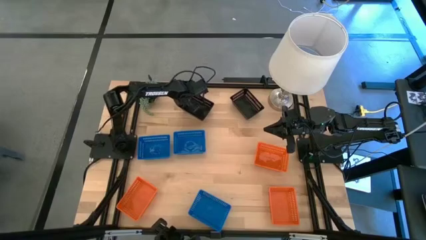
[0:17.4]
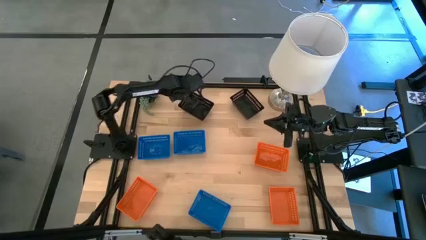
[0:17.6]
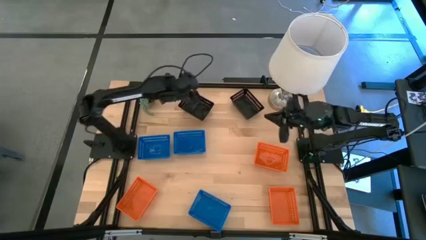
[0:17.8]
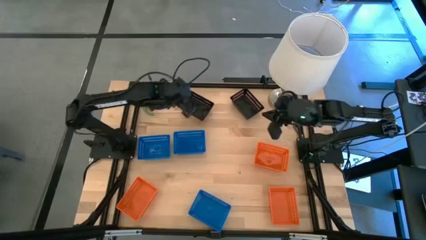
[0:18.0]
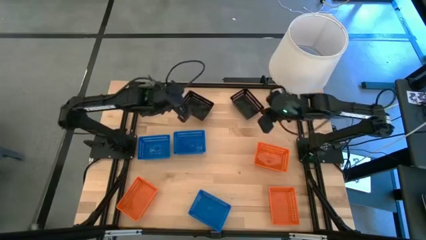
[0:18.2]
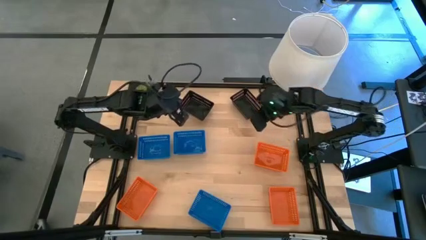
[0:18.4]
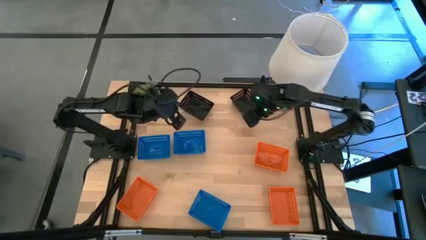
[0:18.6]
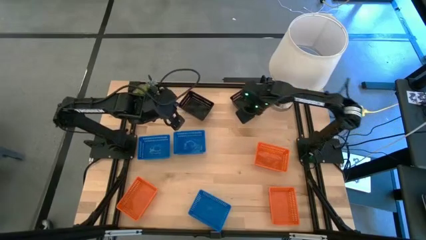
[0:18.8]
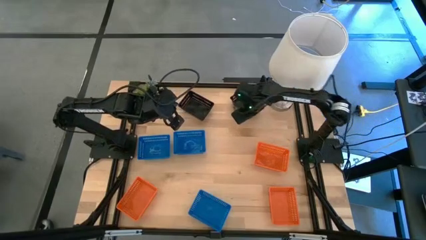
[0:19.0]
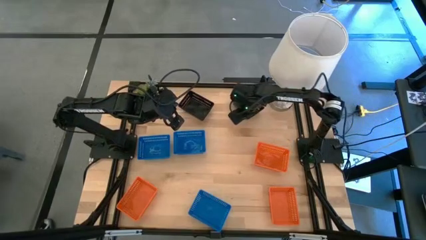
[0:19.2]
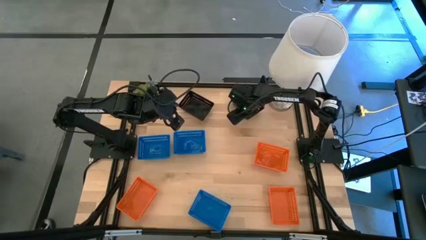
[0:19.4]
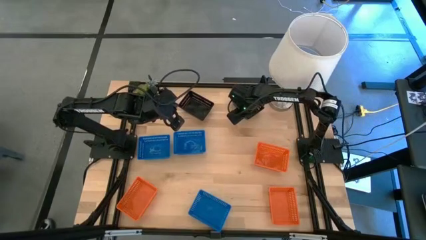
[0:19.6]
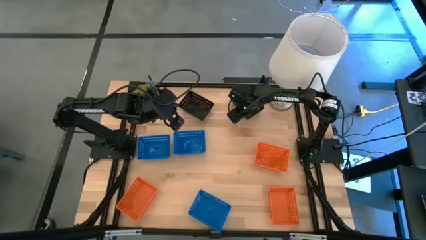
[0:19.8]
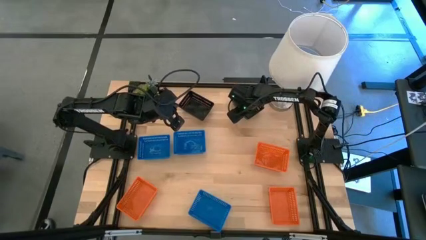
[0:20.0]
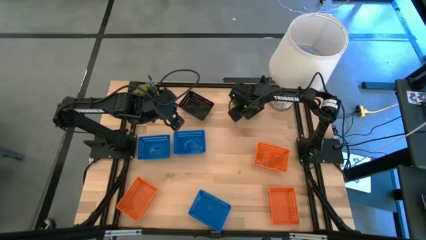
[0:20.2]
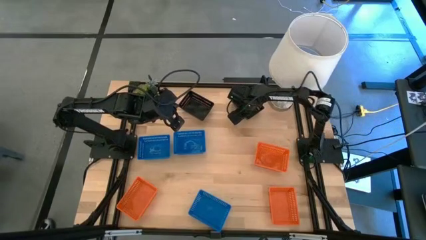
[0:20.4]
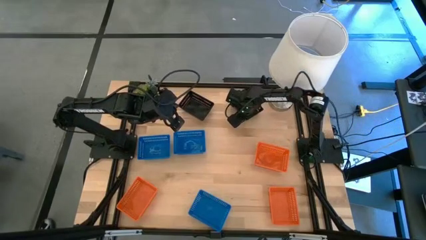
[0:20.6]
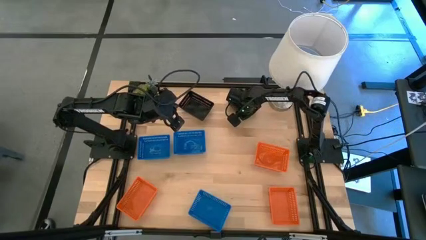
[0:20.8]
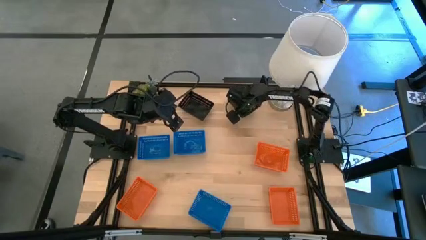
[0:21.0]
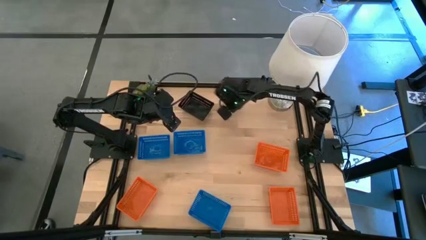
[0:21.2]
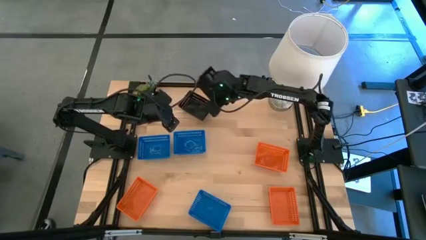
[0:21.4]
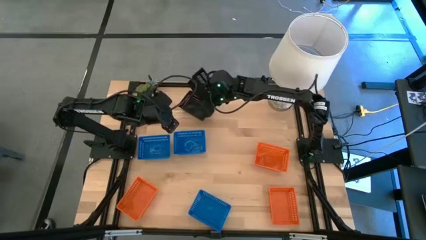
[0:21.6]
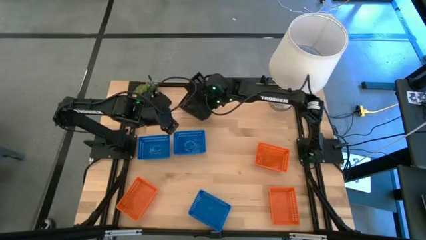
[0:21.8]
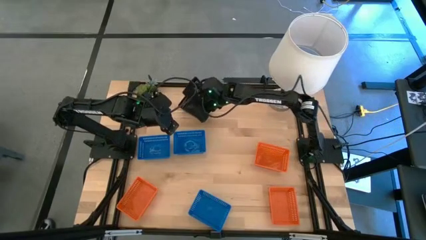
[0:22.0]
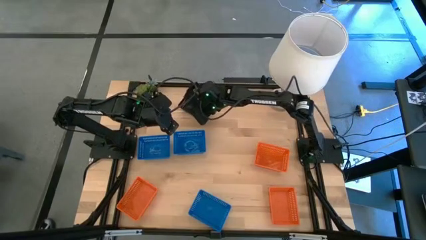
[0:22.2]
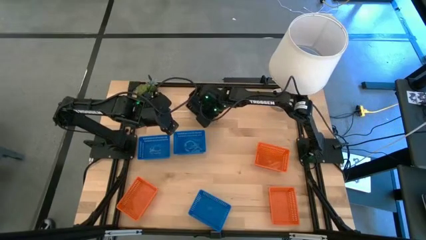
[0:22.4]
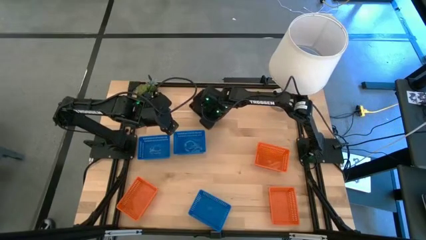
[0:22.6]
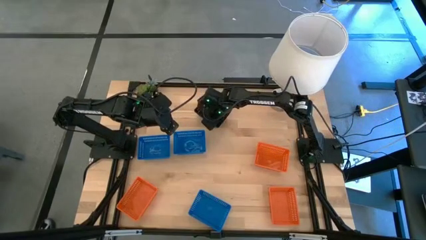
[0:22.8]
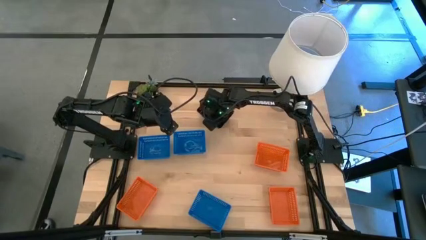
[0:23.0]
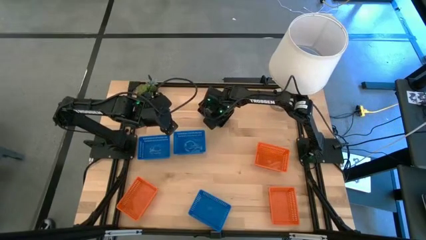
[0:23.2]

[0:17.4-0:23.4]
Stack the right black bin on the stacked black bins

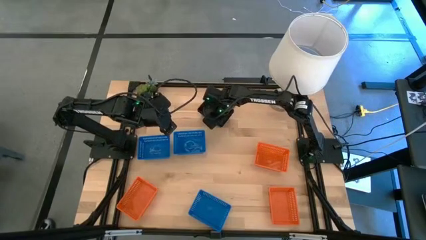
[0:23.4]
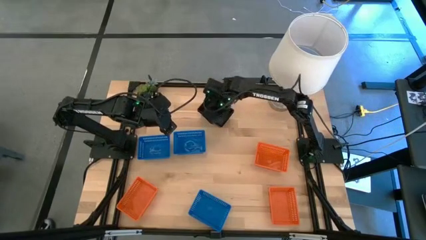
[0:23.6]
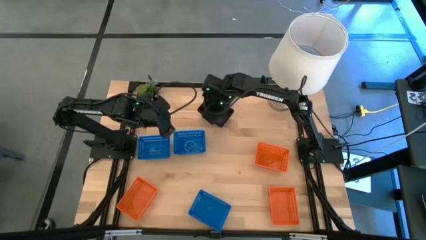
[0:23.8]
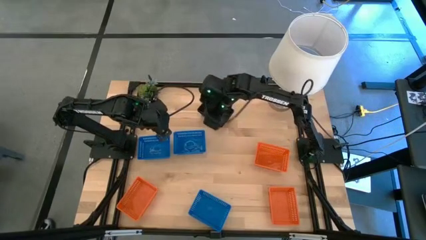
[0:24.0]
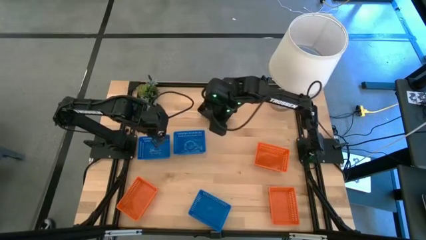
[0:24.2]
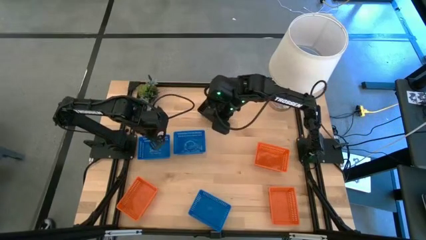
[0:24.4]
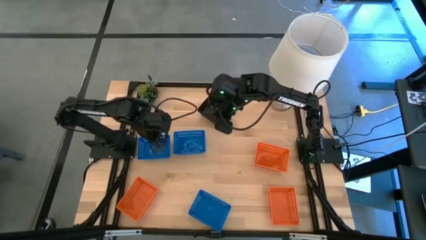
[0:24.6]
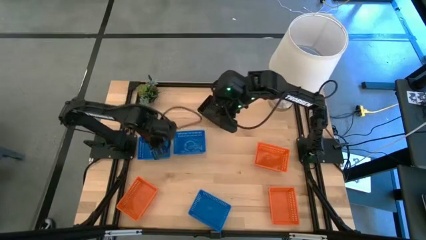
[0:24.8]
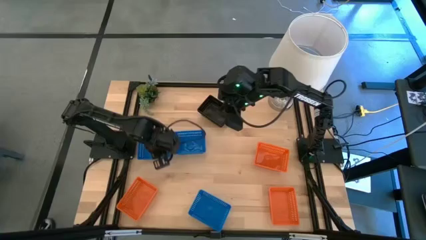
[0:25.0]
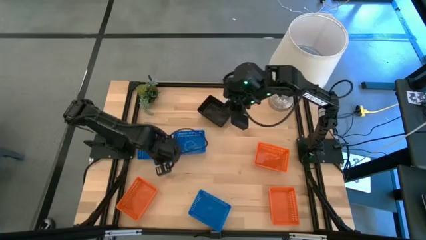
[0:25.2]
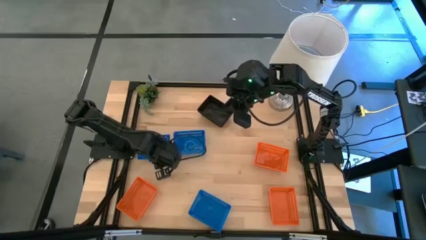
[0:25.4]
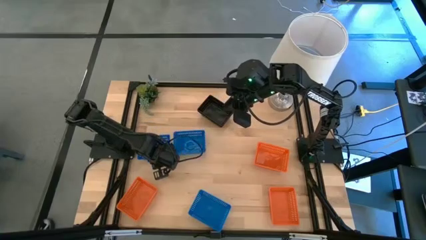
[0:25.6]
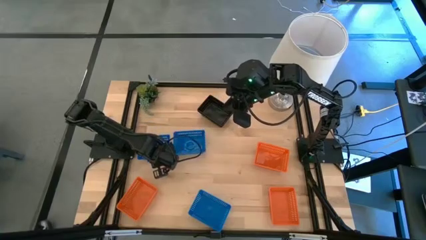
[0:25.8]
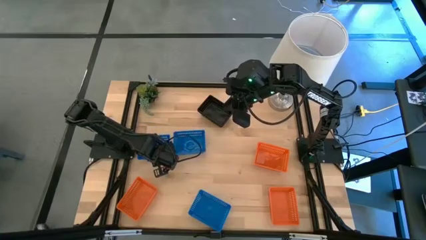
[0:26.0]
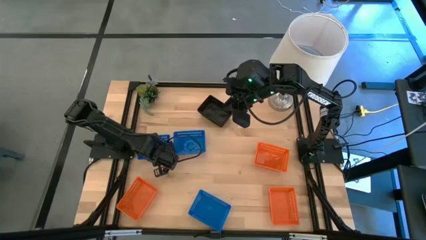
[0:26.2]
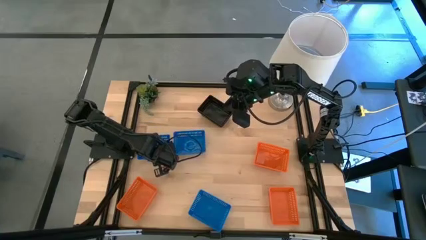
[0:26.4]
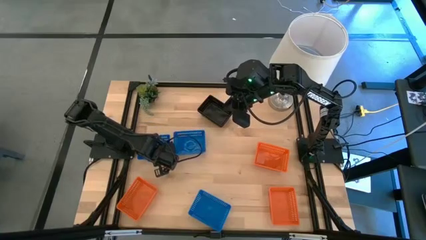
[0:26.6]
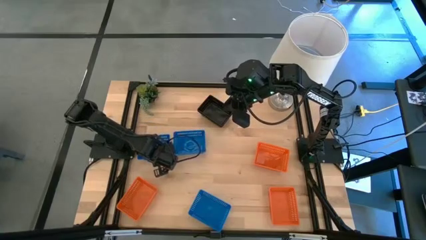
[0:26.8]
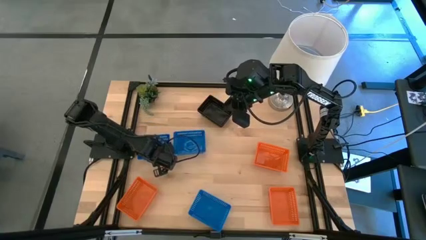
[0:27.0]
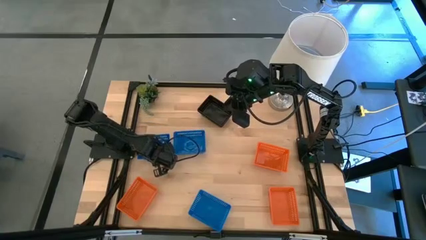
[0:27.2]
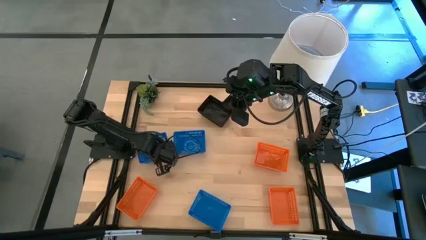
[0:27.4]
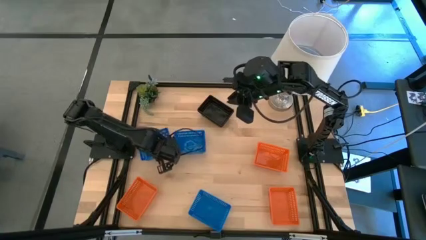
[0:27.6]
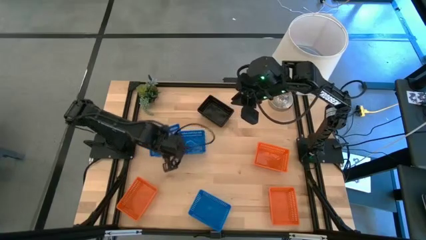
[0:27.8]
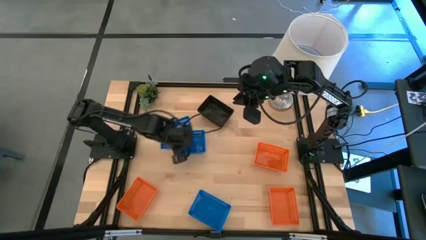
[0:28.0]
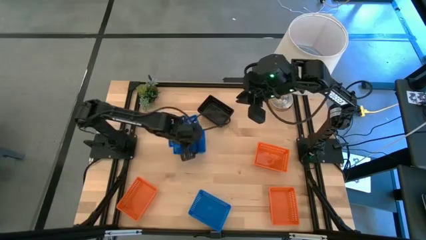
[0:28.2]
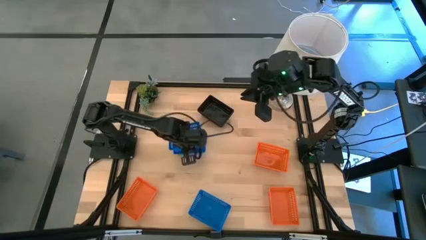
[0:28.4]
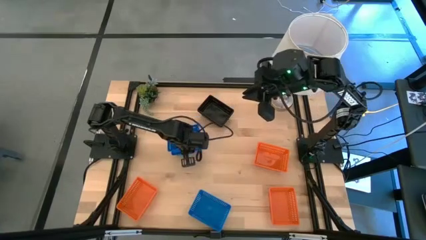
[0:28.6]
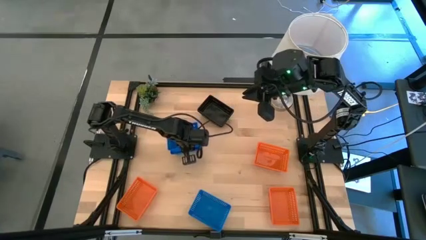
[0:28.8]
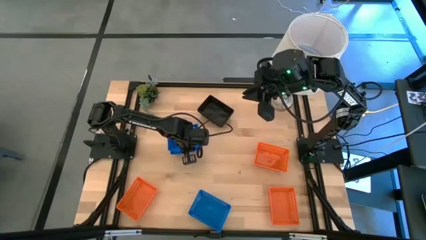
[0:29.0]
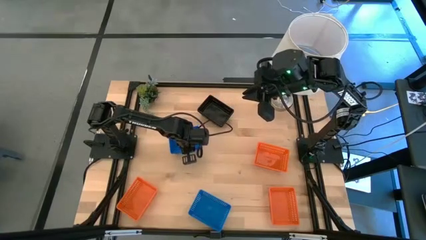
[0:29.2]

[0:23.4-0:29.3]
Stack the top left blue bin on the top right blue bin

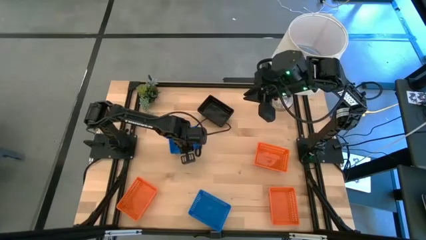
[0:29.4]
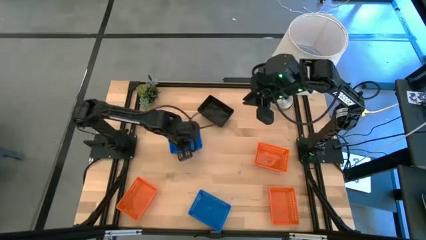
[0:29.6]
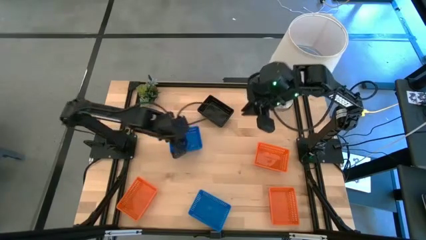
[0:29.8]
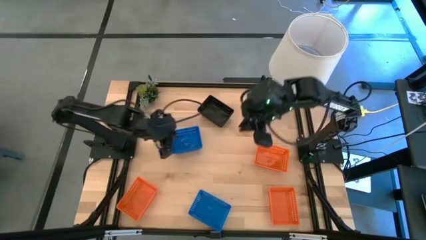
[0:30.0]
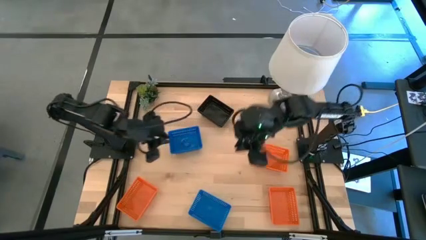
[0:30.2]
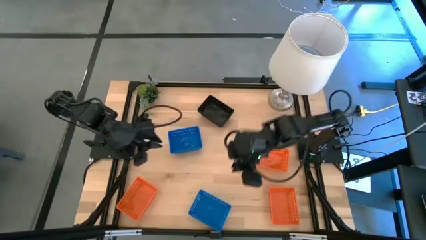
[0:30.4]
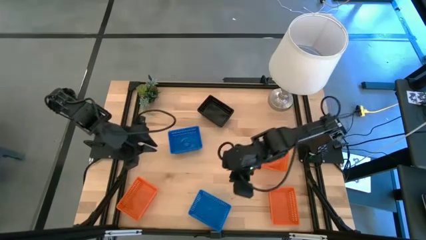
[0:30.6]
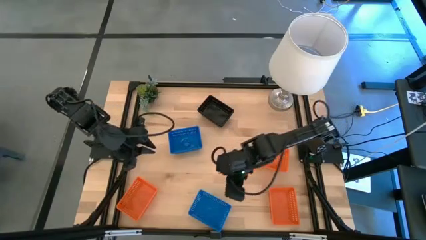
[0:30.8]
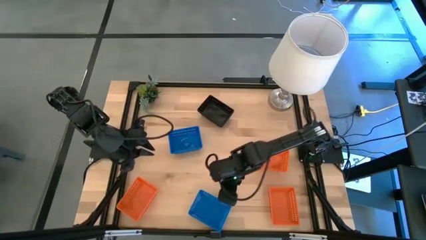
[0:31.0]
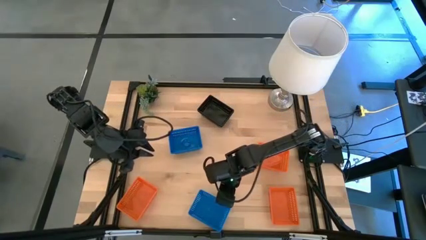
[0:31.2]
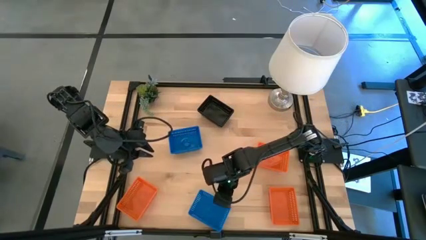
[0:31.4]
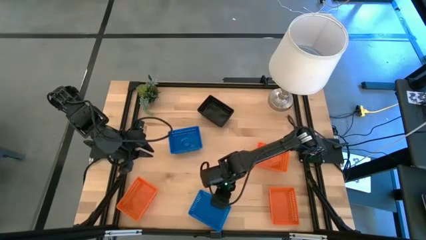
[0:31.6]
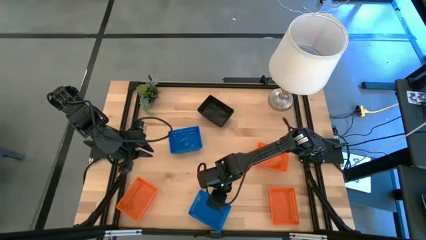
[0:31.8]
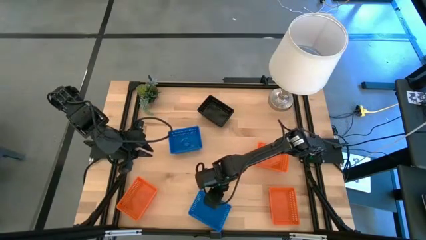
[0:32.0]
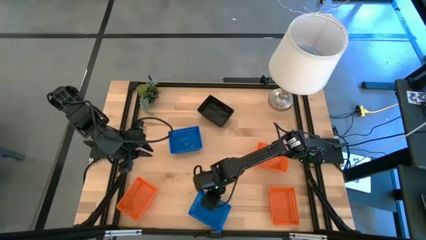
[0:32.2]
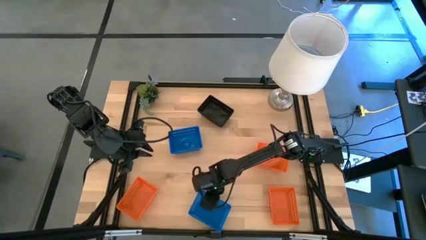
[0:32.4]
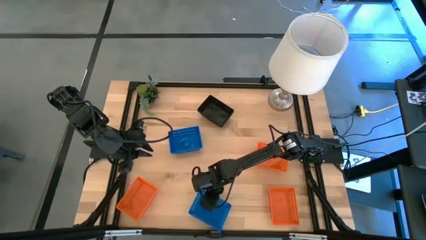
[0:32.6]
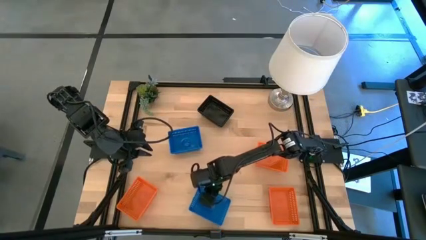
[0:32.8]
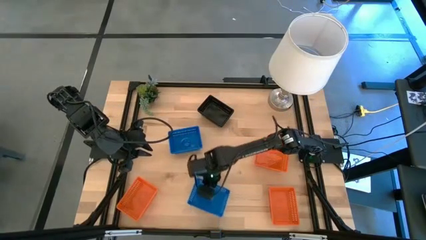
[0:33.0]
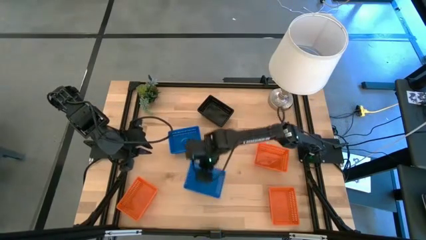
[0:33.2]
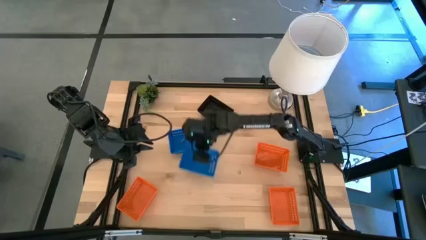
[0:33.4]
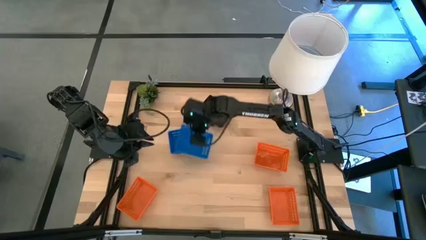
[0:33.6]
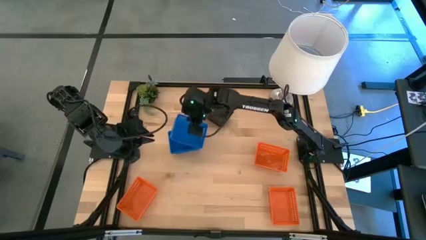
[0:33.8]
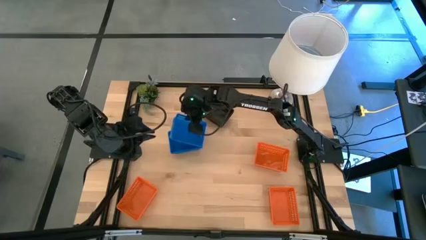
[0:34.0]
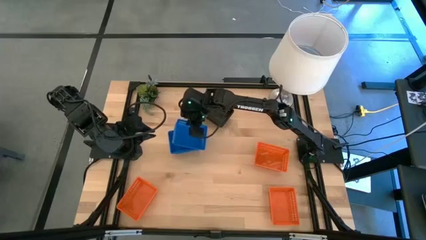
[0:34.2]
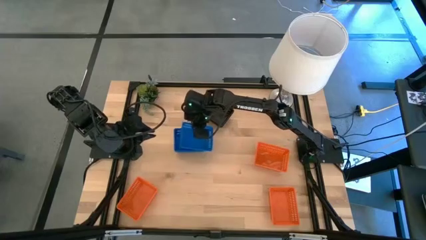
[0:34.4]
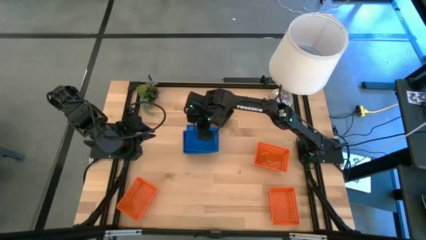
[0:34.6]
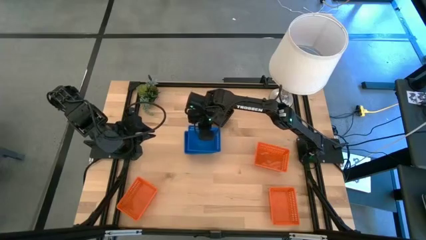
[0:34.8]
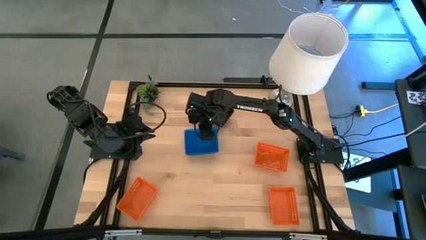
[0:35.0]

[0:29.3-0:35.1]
Stack the bottom blue bin on the stacked blue bins
